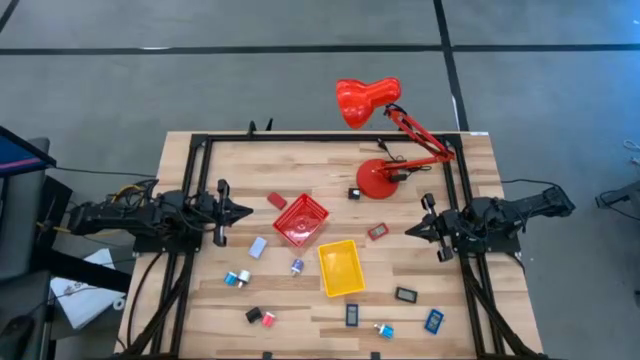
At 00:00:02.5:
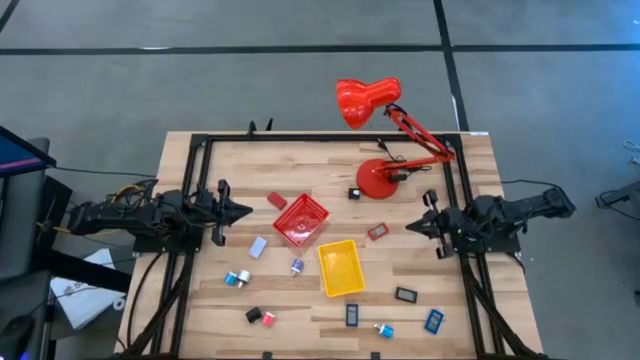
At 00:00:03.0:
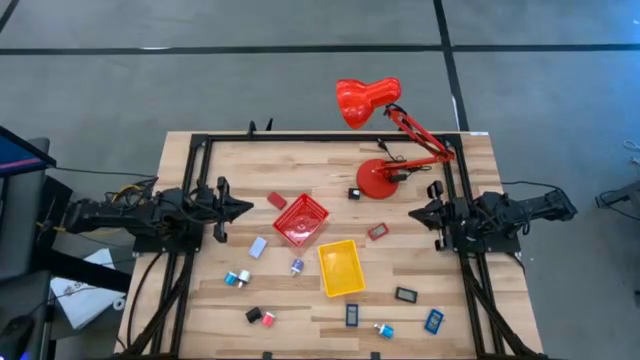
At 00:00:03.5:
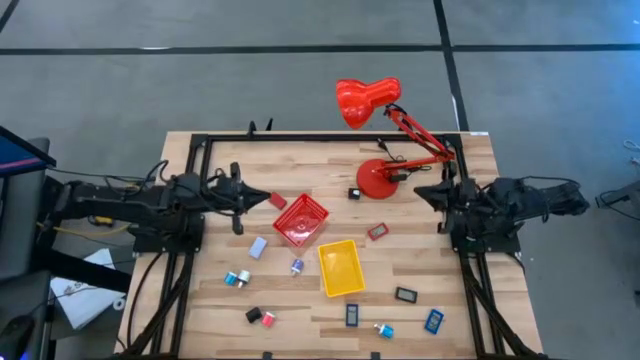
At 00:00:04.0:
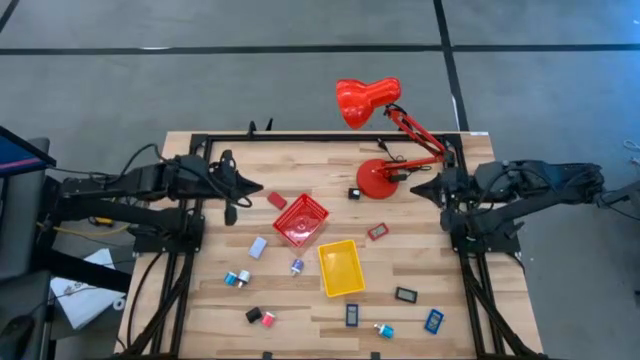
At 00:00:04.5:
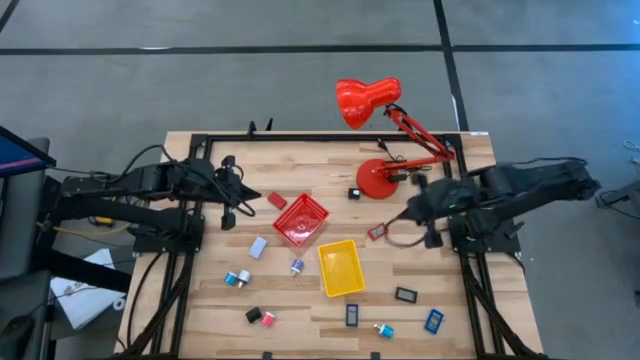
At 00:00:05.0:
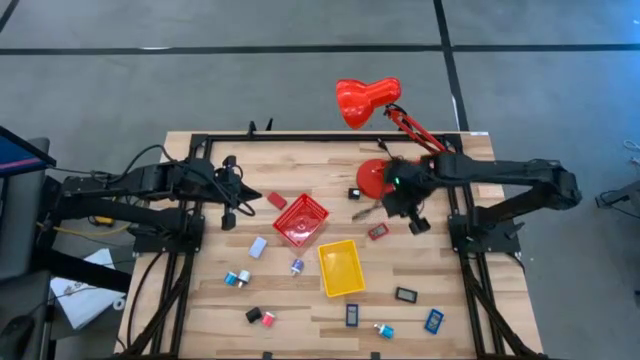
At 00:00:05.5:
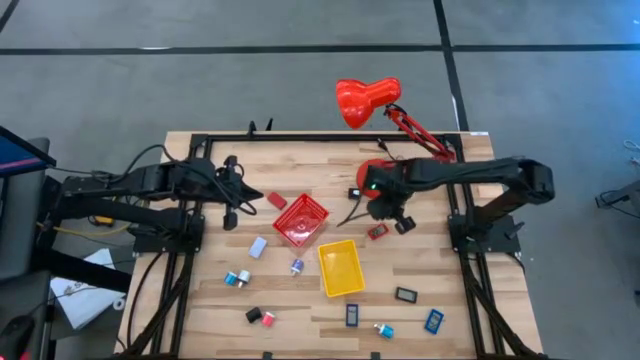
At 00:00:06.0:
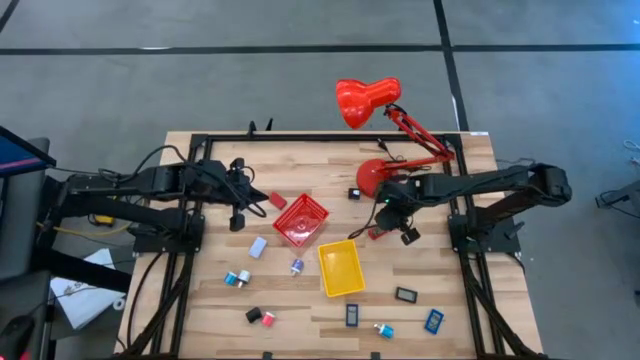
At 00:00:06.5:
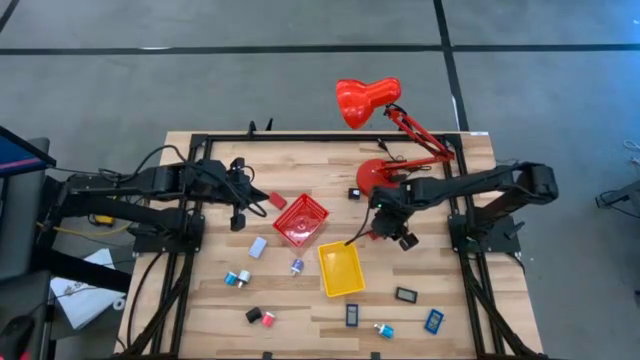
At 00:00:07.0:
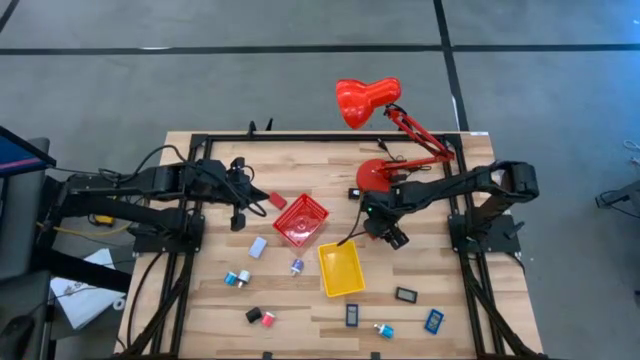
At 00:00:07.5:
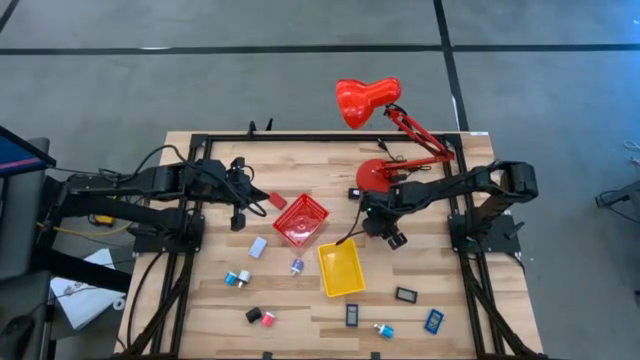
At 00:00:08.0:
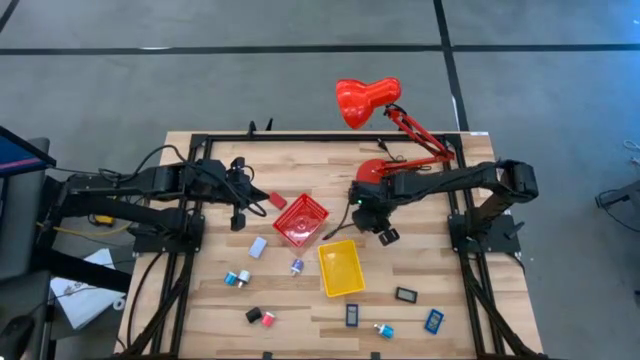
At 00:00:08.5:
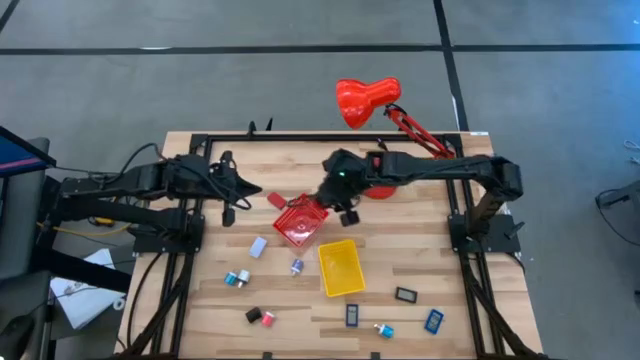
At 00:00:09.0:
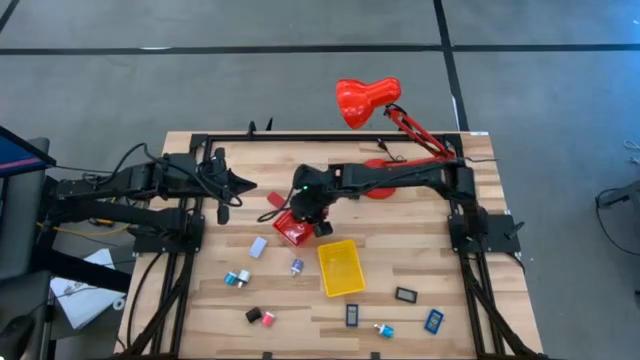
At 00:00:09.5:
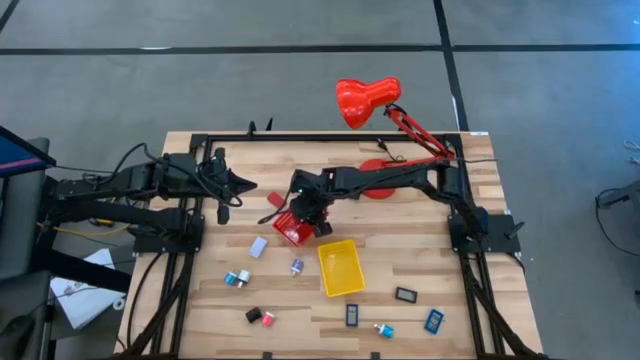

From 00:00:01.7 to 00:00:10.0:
Task: Pick & Place Office items
Put the right red digital clock into the red basket

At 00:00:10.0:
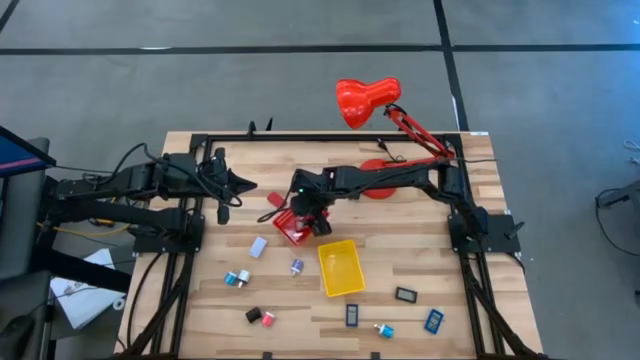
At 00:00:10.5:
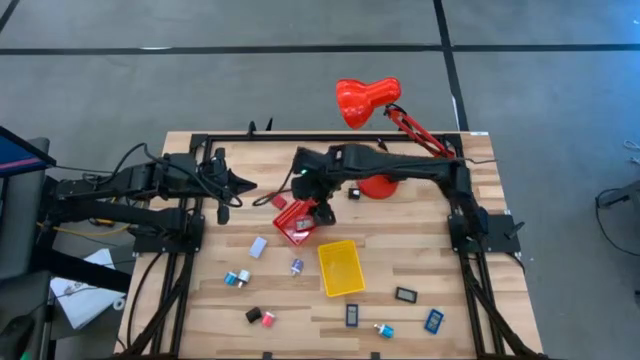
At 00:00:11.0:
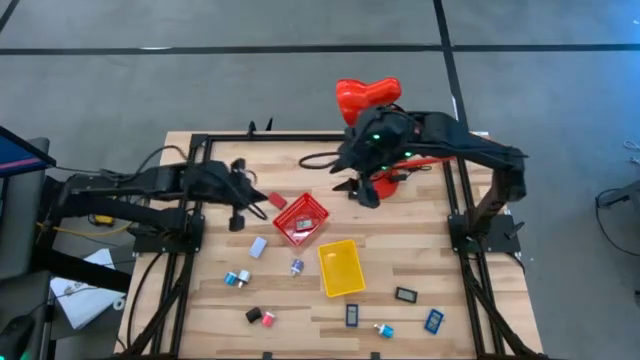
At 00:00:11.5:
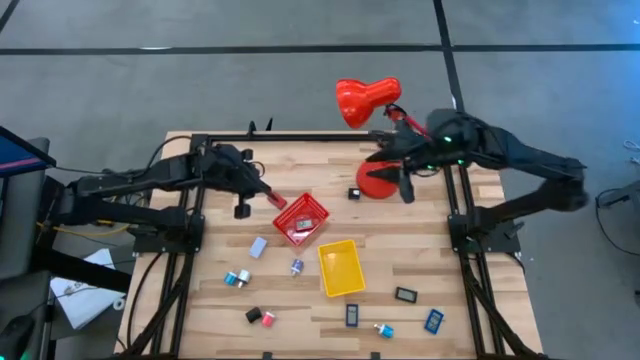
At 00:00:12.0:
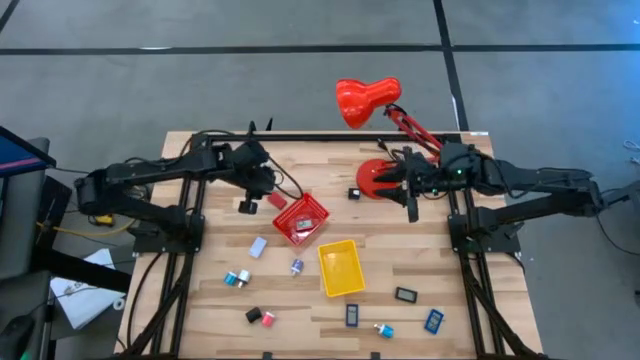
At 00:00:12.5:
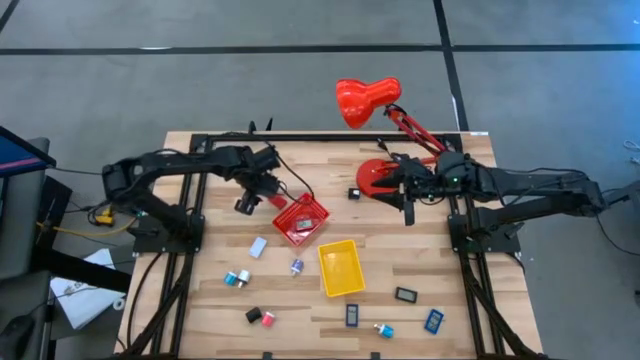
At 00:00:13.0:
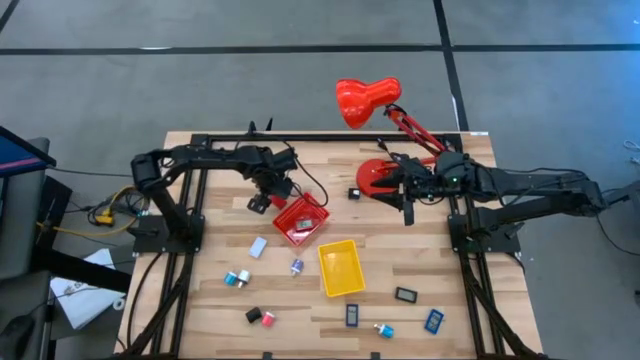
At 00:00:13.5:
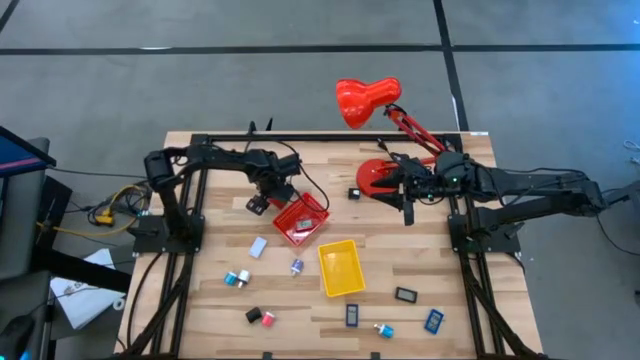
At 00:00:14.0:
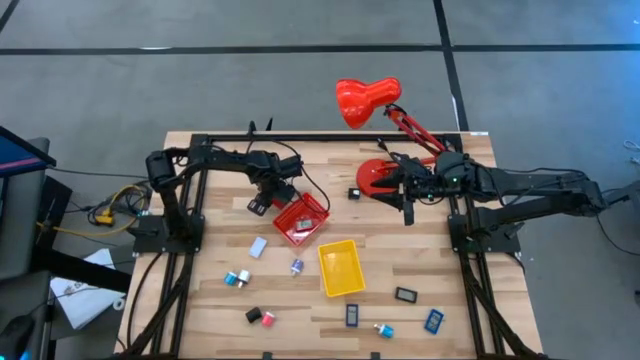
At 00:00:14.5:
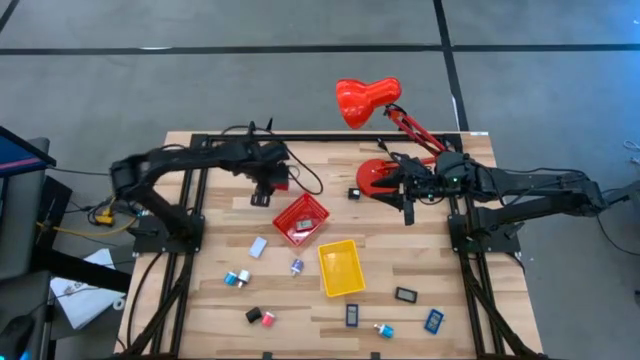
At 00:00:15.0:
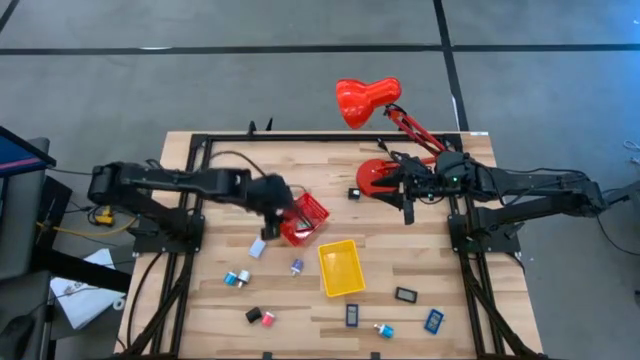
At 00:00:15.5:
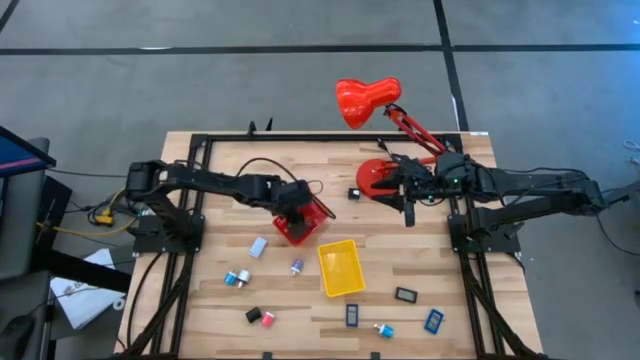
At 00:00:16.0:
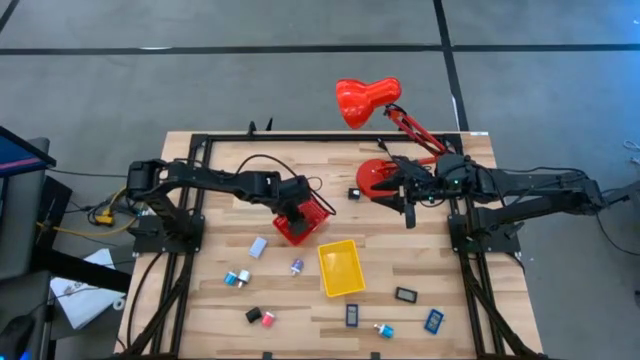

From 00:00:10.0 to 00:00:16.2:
Put the red digital clock into the red basket

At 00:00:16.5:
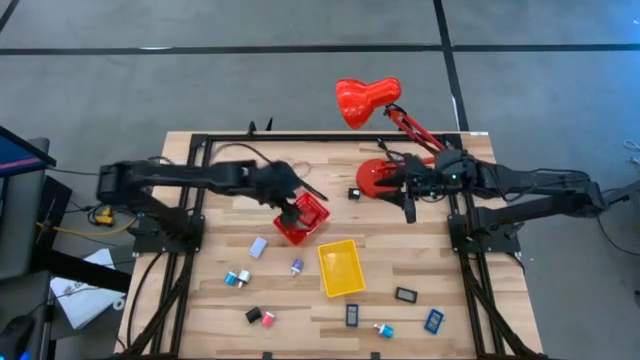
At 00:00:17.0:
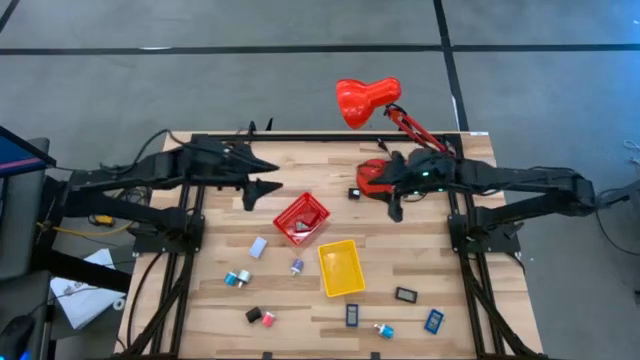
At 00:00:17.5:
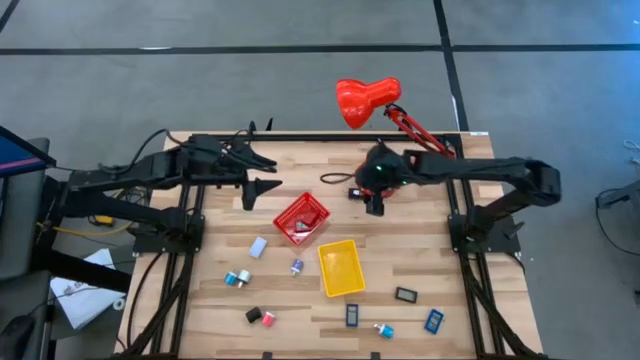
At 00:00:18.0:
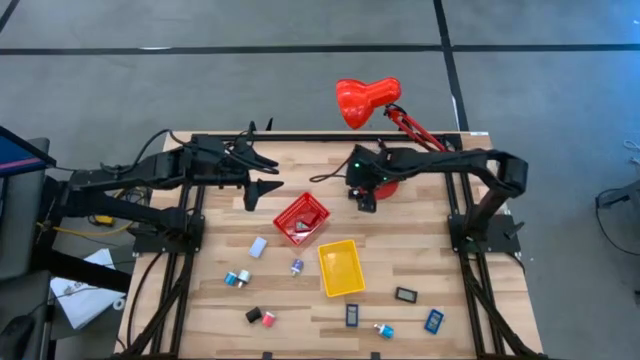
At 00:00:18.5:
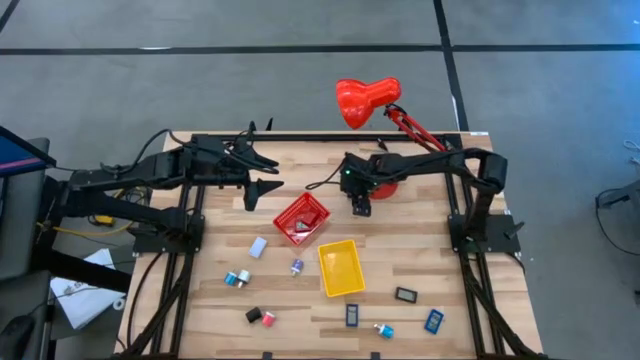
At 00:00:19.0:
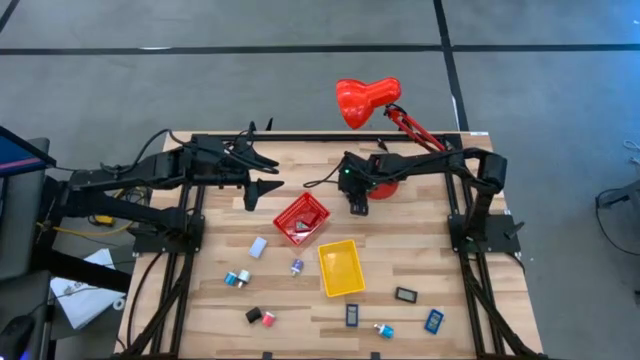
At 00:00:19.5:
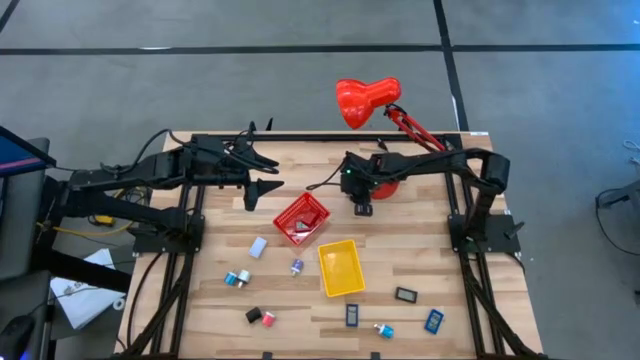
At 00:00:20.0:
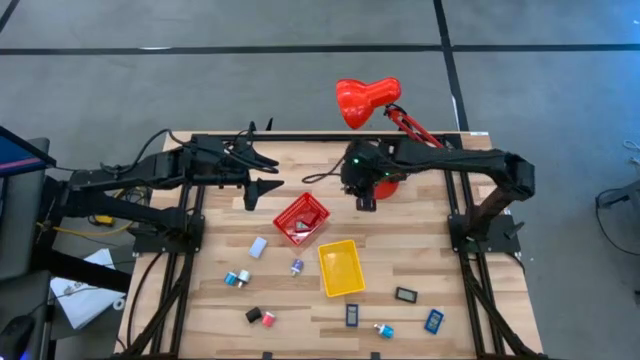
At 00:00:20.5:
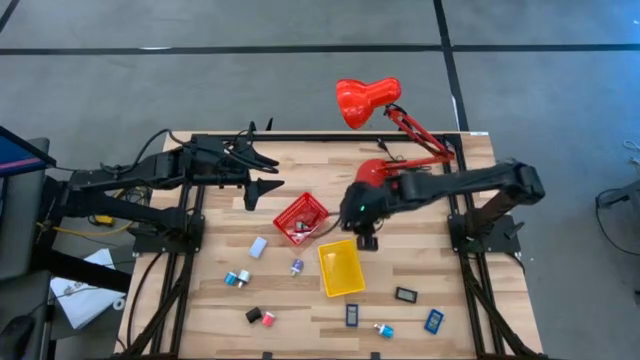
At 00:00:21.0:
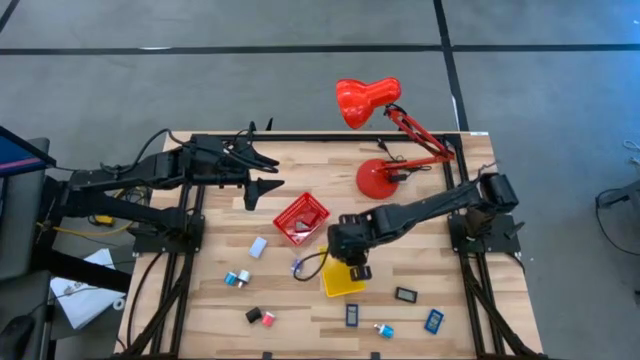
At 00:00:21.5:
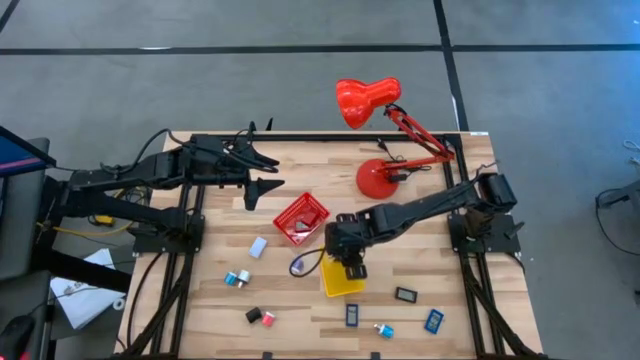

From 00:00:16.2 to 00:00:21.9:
Put the top black charger adapter into the yellow basket

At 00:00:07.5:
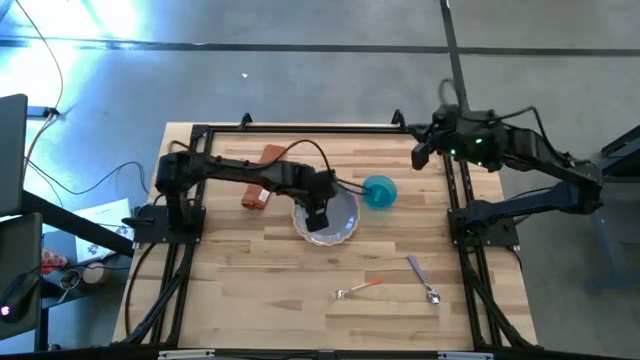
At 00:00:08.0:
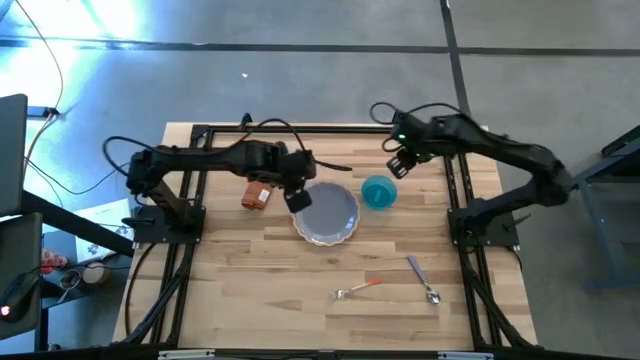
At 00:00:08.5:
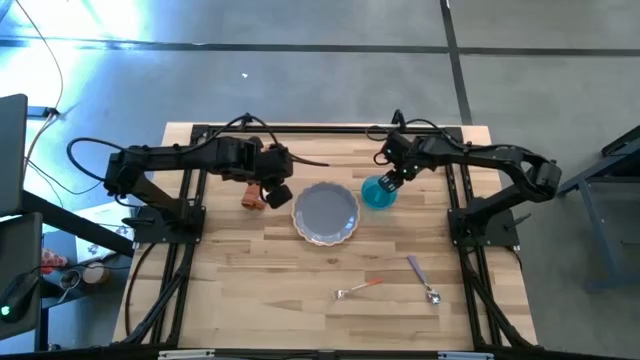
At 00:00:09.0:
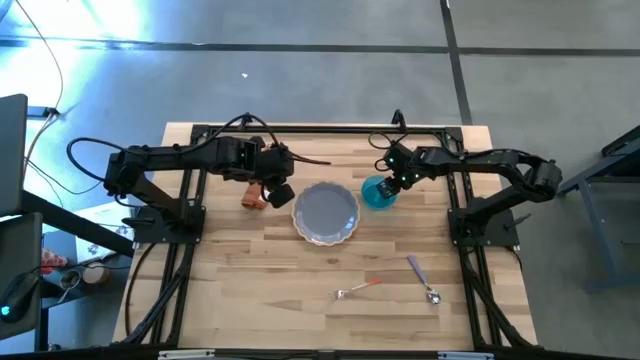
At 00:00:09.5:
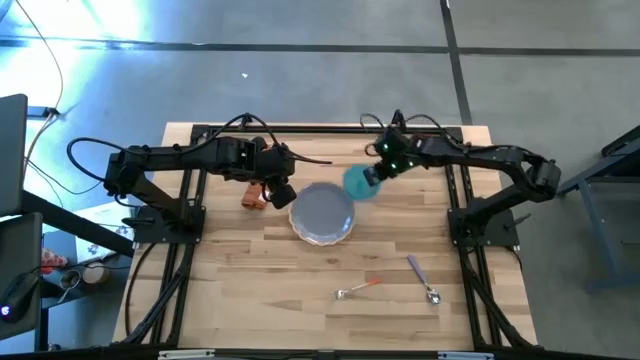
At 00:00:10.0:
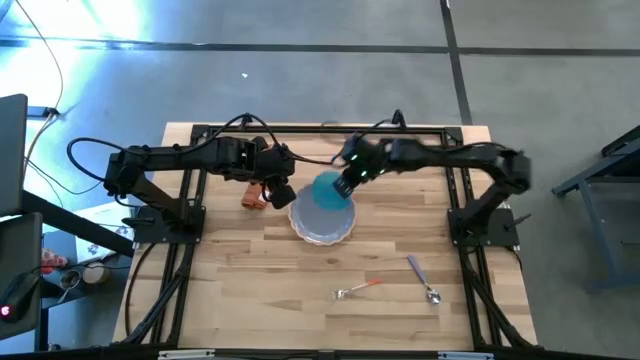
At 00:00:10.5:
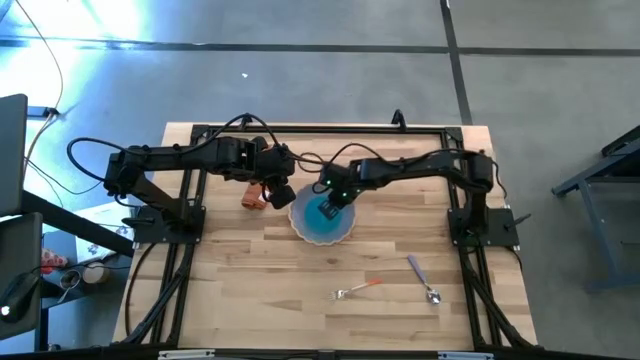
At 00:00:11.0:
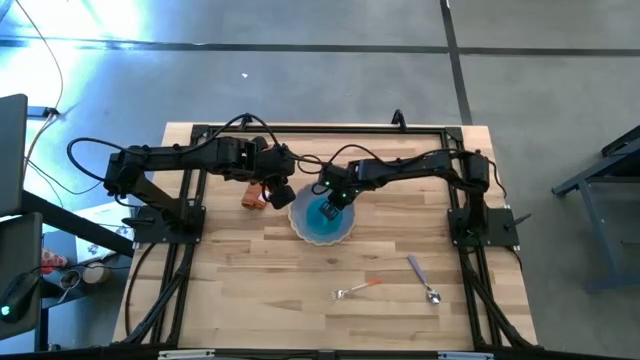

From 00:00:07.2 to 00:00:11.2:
Task: Set table place
Put the blue bowl on top of the light blue plate
